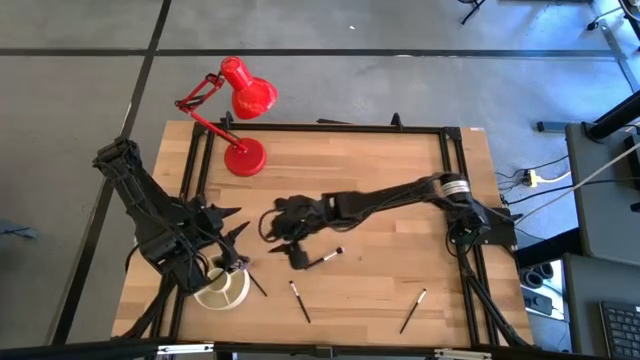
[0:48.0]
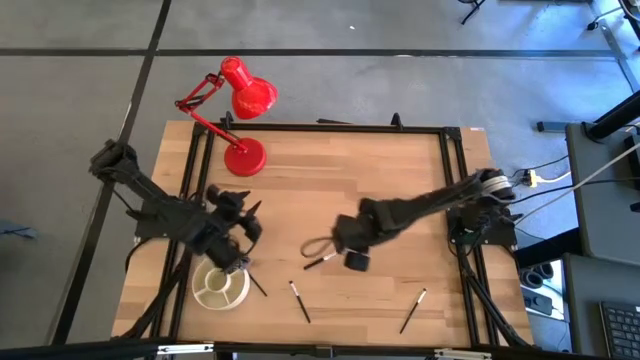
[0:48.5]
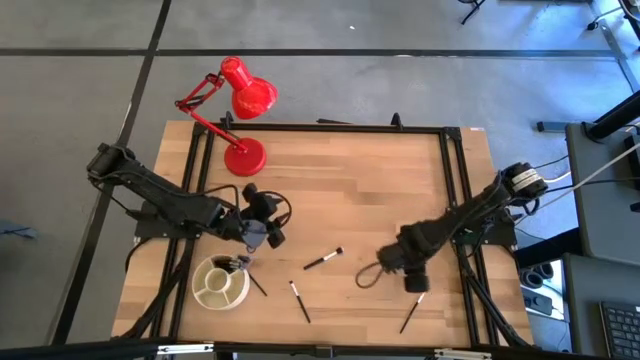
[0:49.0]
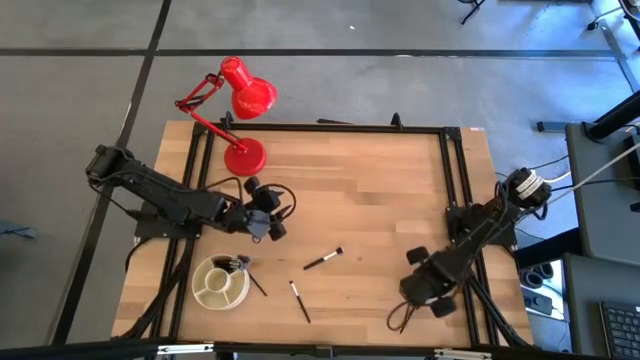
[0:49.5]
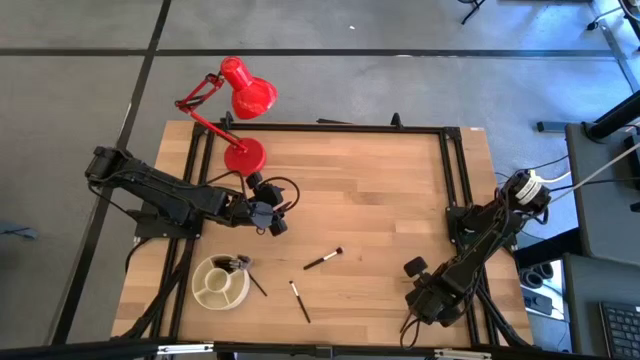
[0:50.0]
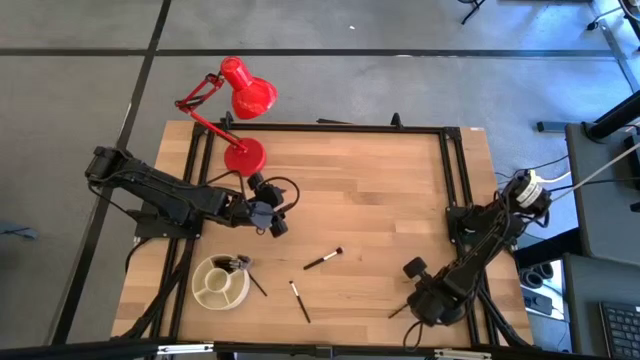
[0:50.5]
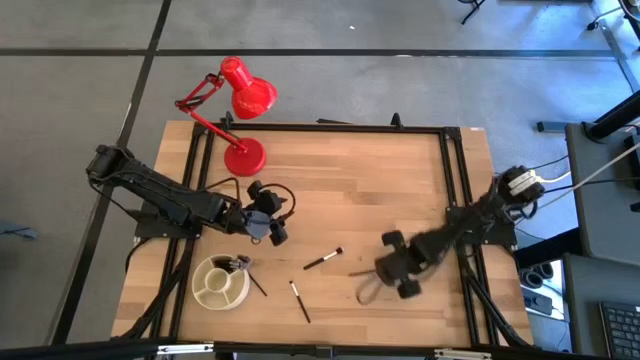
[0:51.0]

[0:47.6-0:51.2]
Task: Put items in baskets/containers
Put the black eyeshadow brush into the white organizer bin

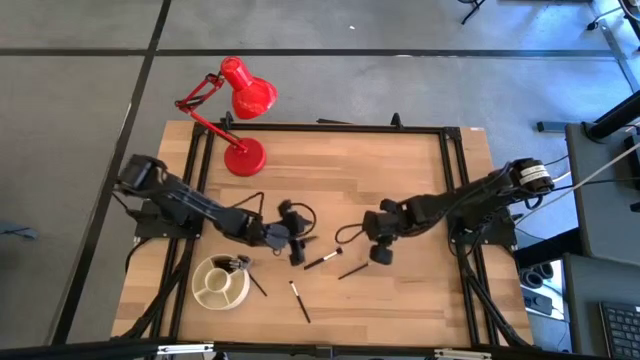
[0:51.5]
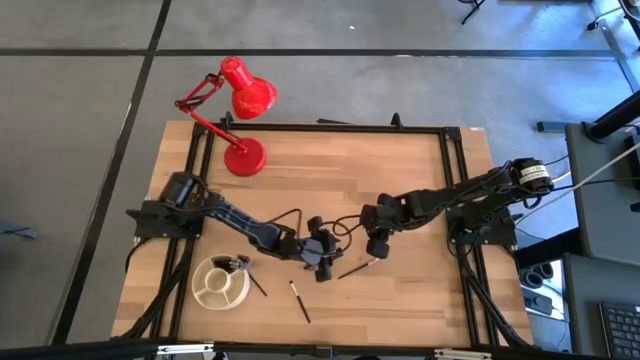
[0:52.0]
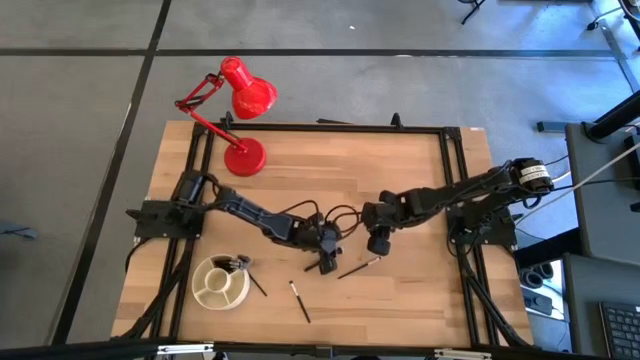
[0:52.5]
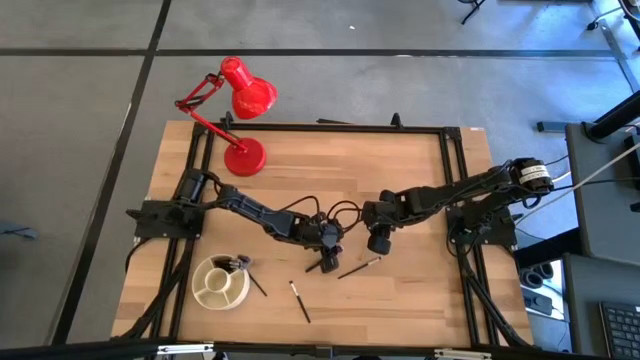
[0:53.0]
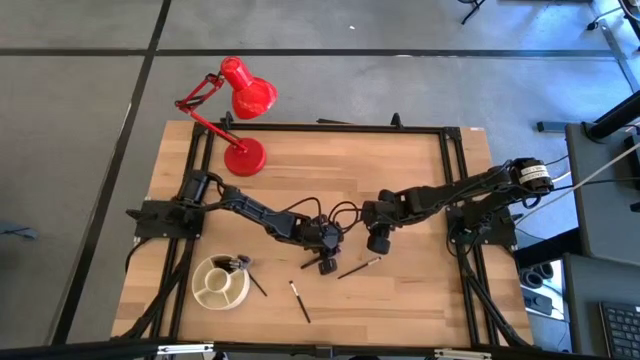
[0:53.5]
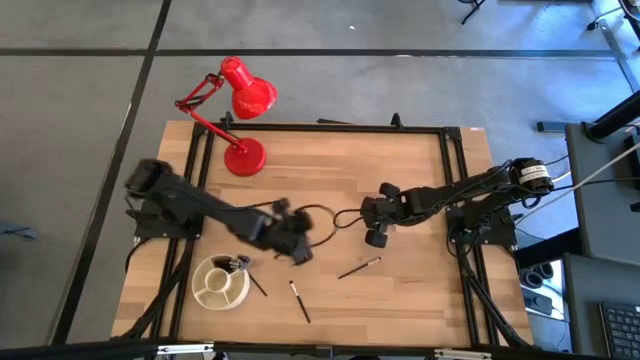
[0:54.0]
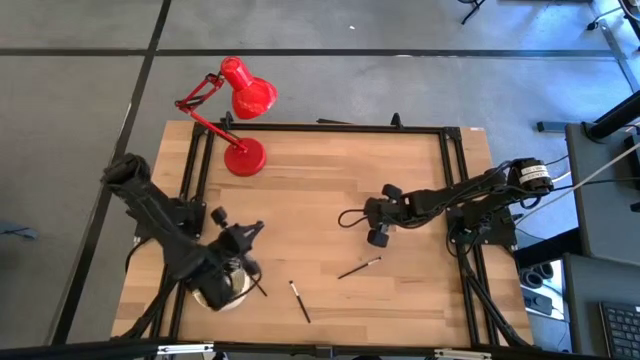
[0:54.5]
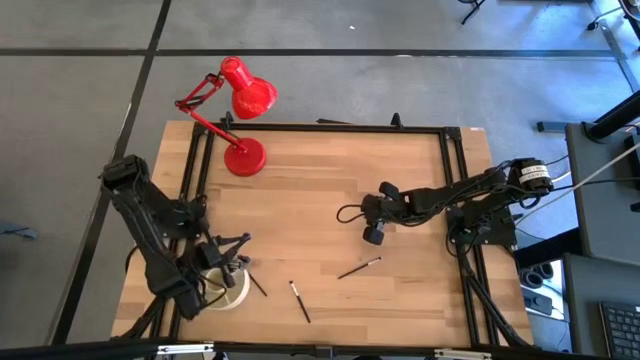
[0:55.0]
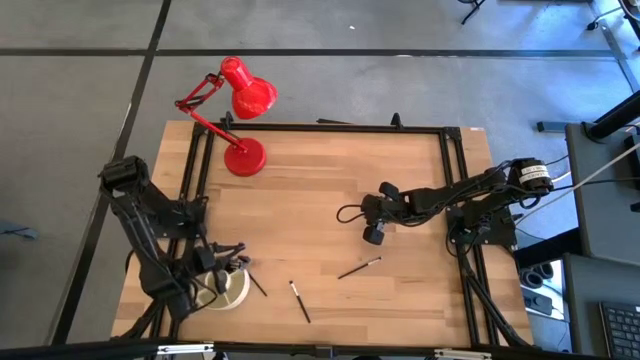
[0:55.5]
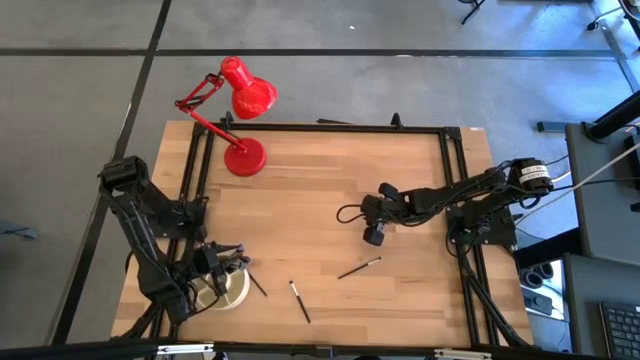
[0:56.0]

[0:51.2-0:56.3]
Put the black powder brush into the white organizer bin

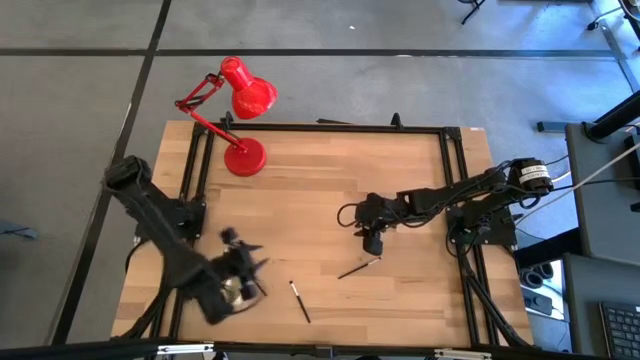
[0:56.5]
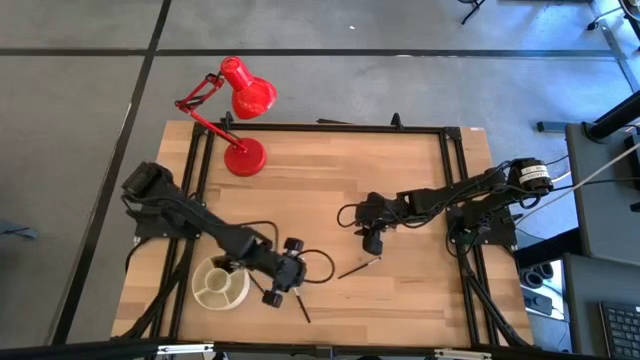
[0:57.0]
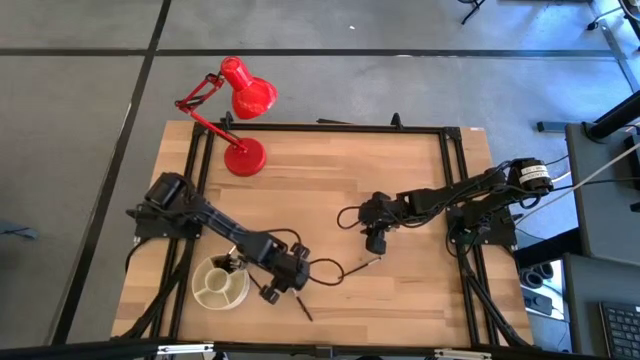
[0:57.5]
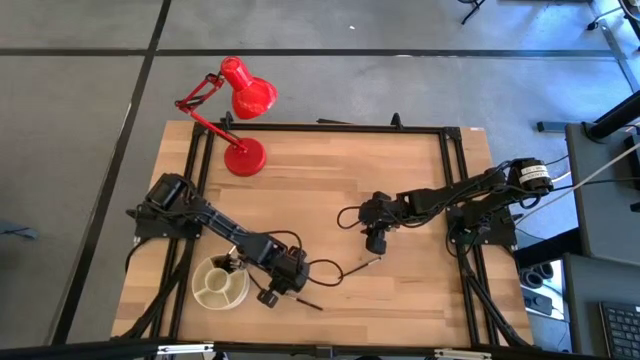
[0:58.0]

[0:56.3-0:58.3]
Put the eyeshadow brush into the white organizer bin

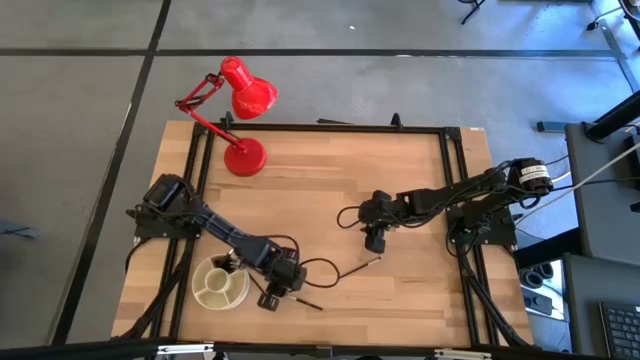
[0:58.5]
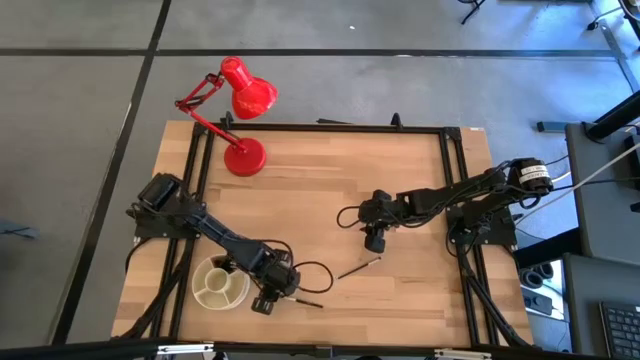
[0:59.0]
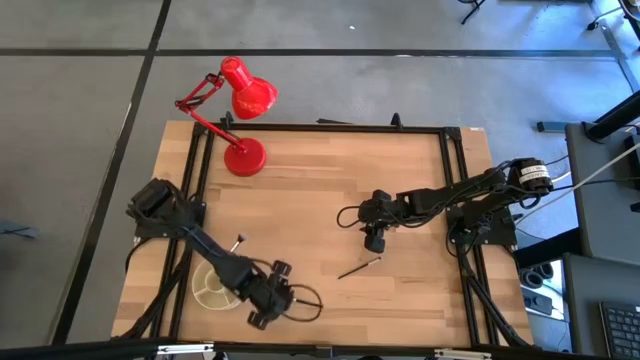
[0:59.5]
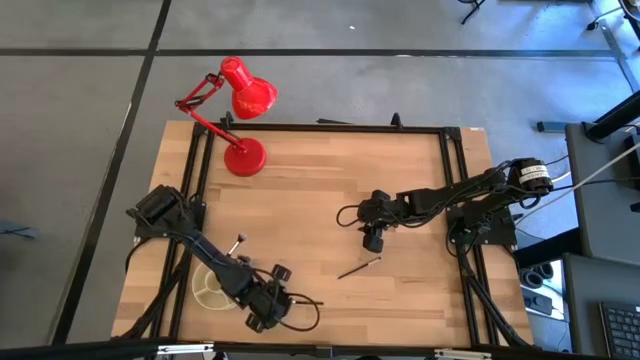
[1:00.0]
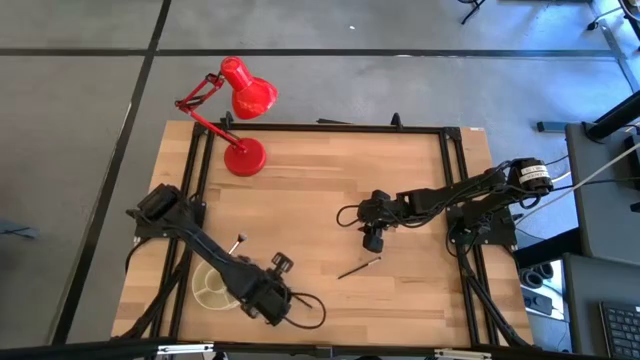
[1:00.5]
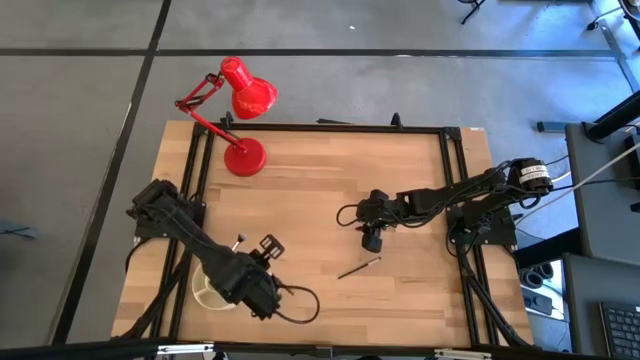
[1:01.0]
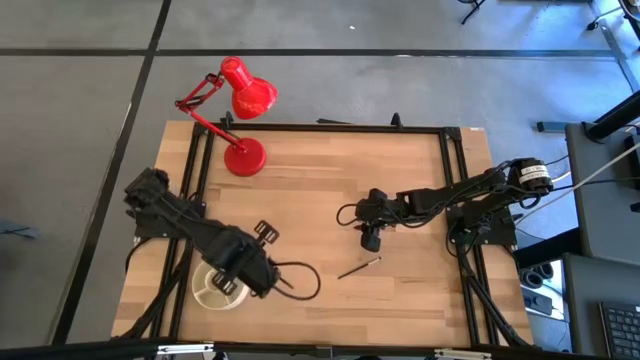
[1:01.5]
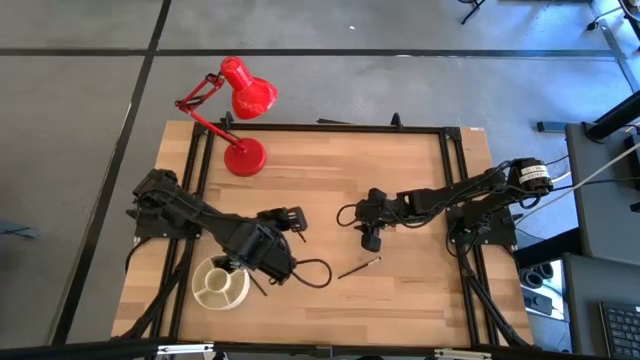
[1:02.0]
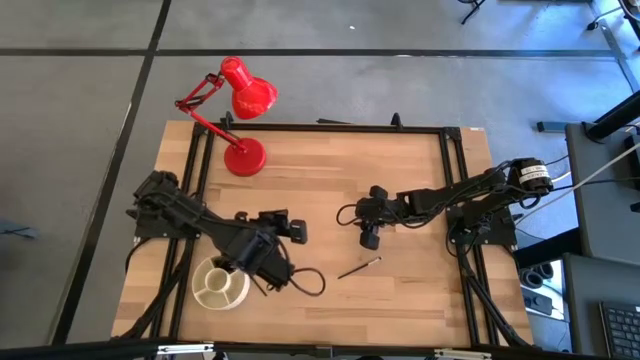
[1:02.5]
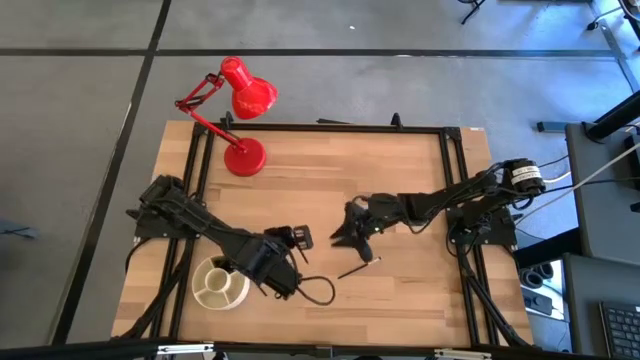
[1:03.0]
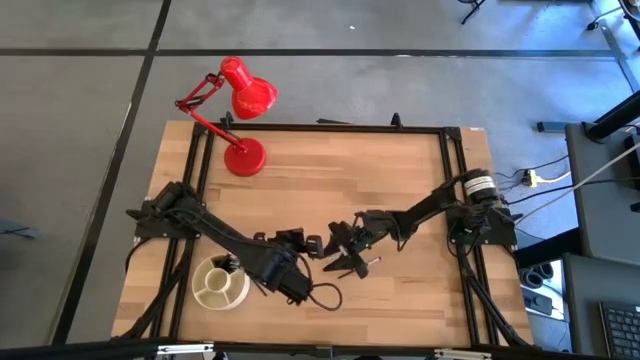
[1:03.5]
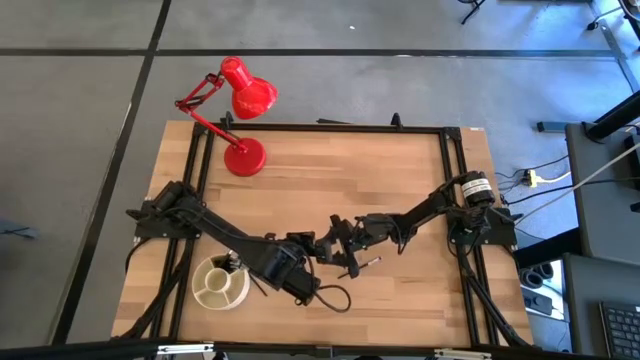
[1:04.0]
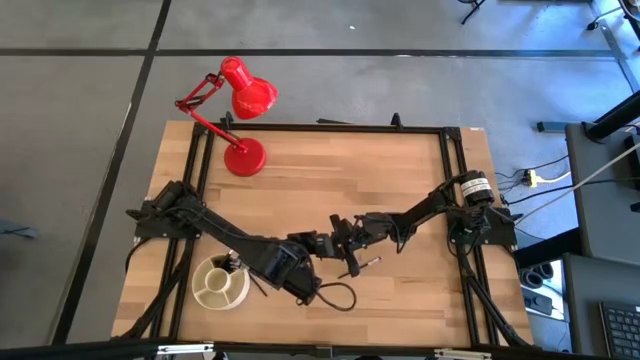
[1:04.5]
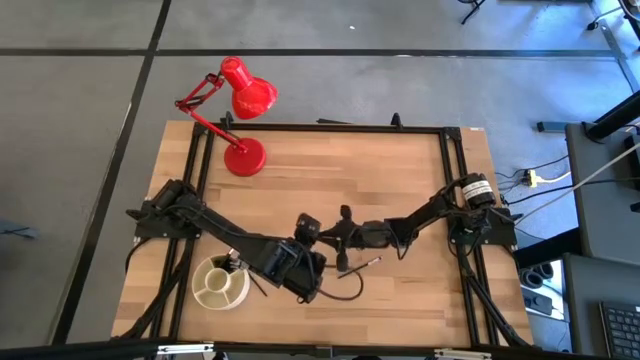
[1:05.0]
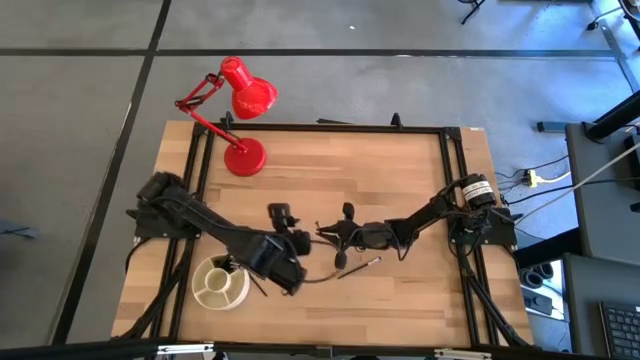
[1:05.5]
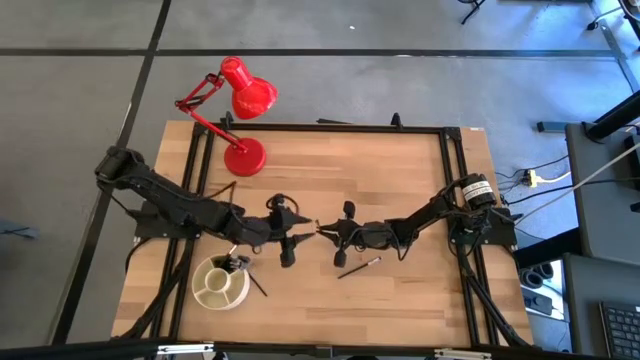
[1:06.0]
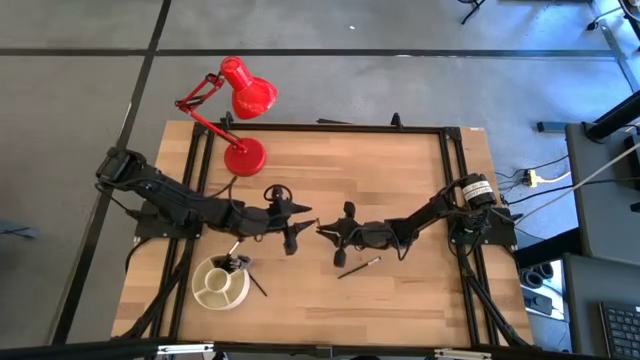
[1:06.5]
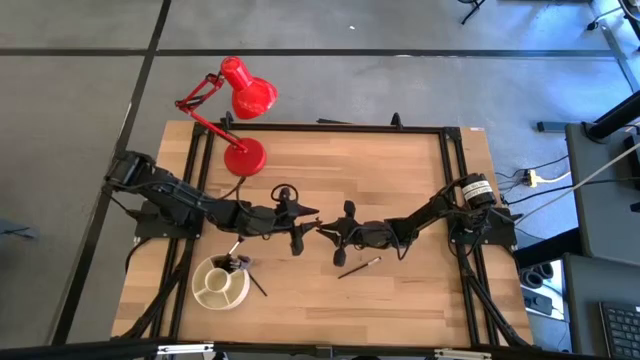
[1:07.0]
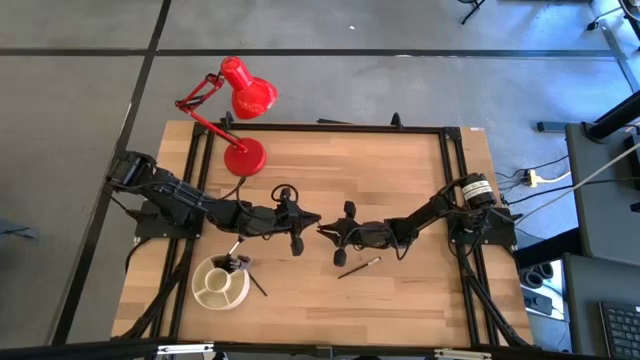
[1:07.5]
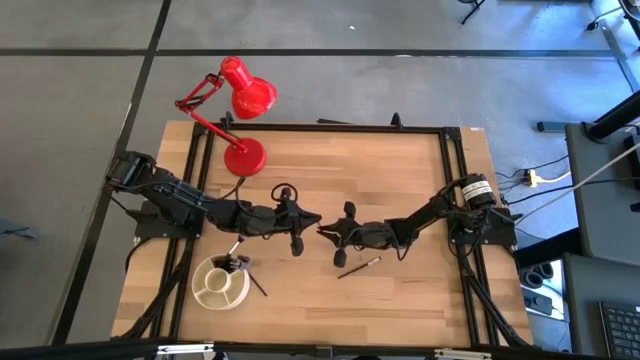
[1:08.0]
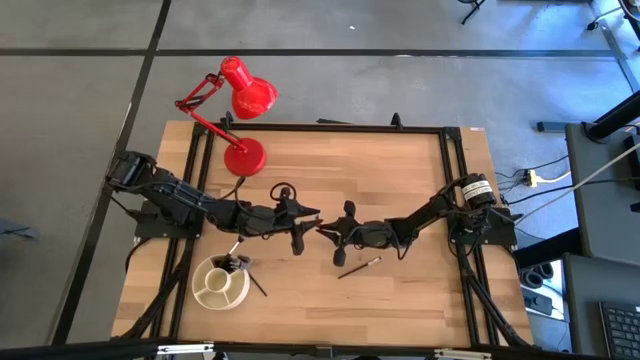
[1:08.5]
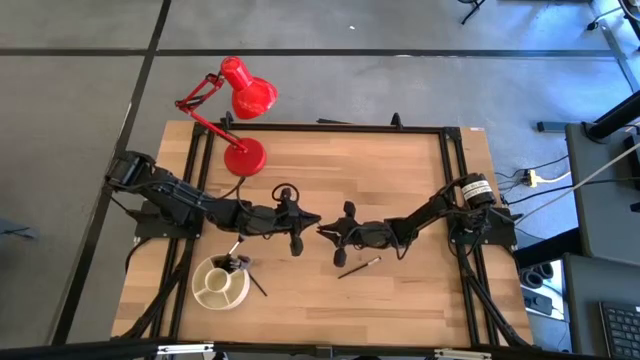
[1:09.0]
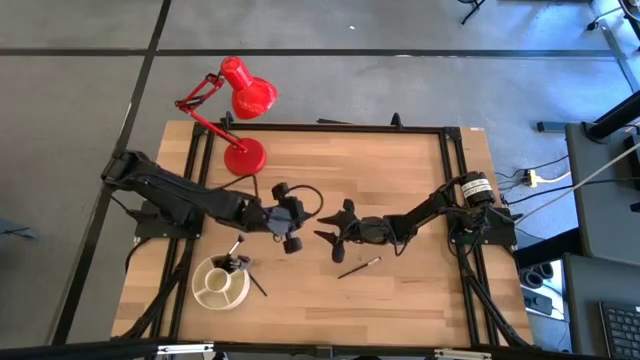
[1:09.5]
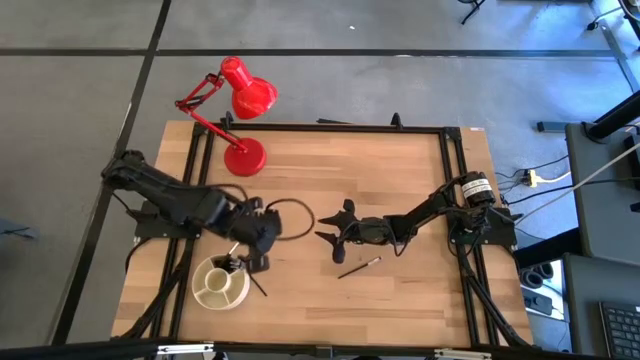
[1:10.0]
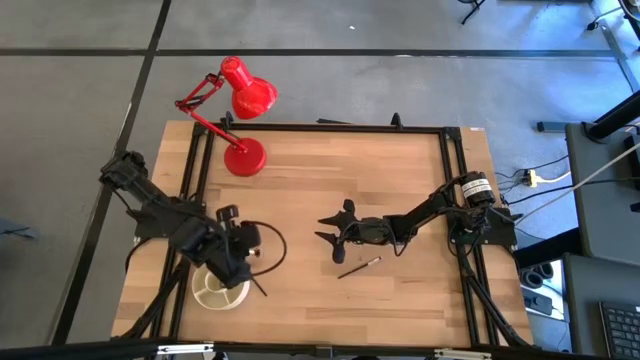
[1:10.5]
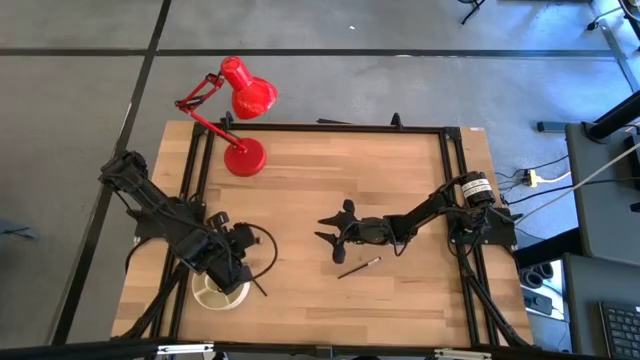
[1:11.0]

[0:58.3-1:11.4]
Put the eyeshadow brush into the white organizer bin
